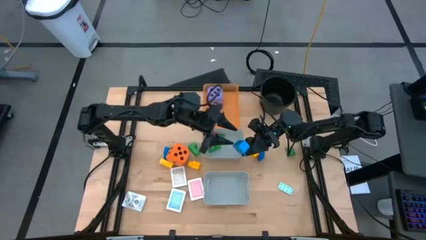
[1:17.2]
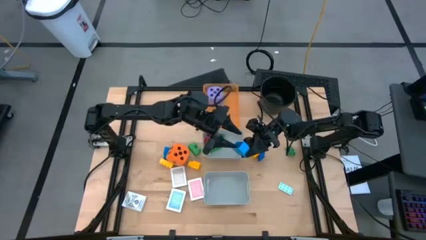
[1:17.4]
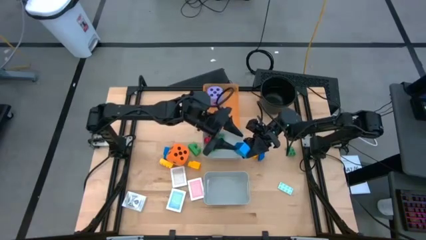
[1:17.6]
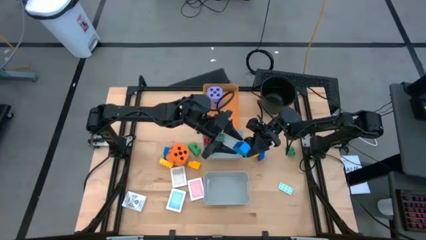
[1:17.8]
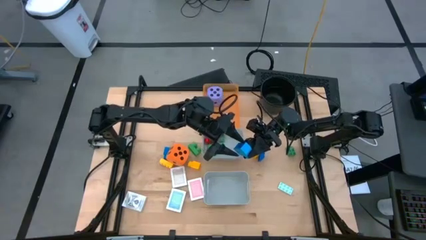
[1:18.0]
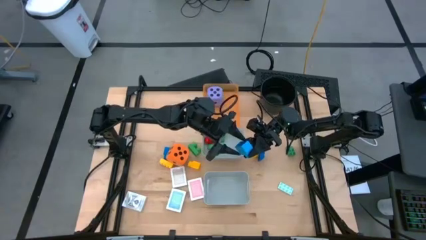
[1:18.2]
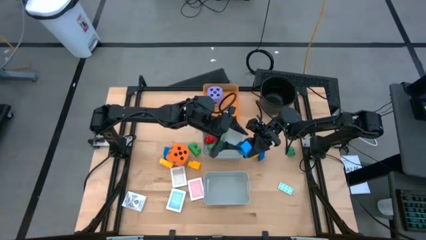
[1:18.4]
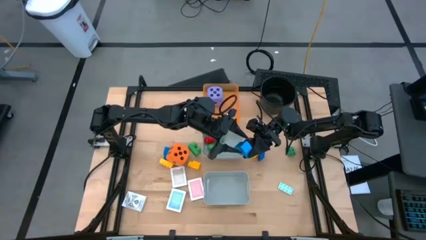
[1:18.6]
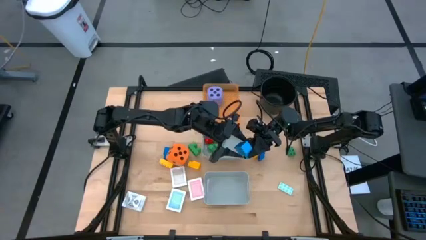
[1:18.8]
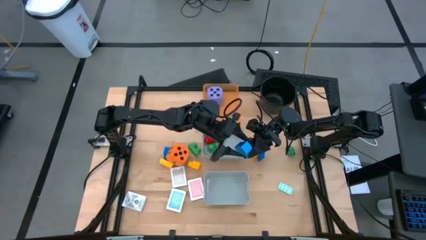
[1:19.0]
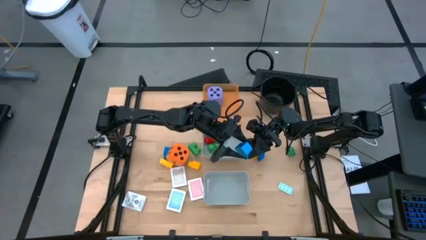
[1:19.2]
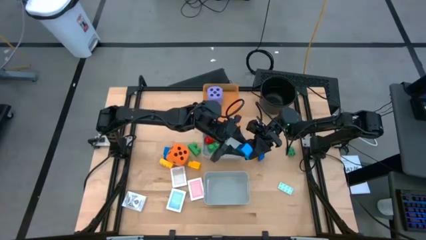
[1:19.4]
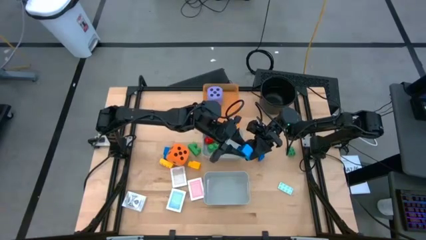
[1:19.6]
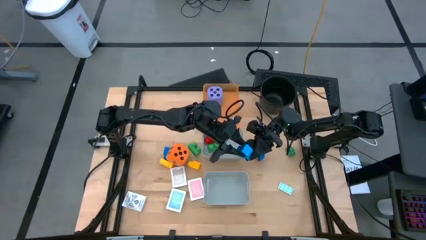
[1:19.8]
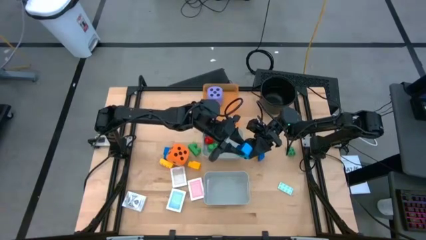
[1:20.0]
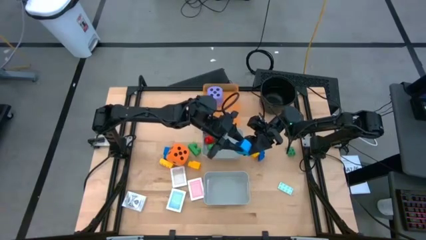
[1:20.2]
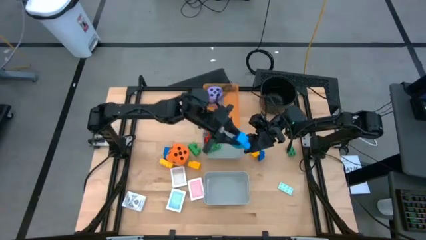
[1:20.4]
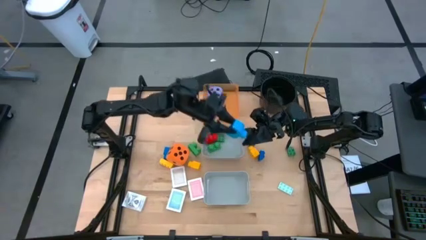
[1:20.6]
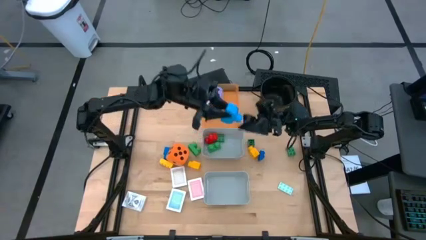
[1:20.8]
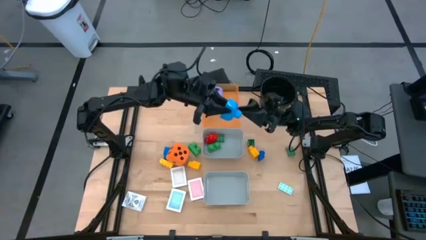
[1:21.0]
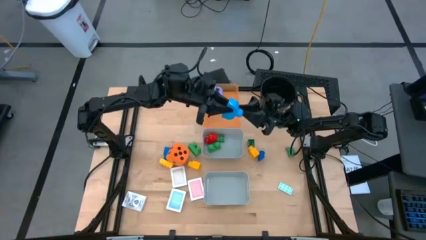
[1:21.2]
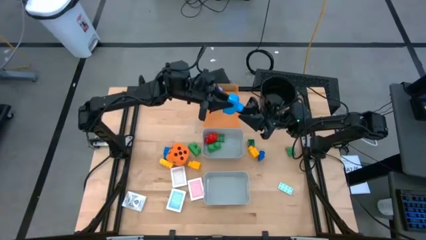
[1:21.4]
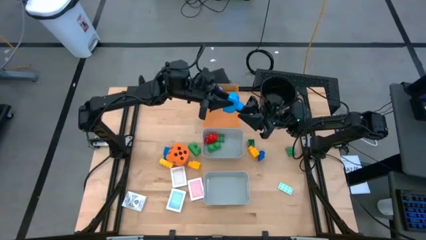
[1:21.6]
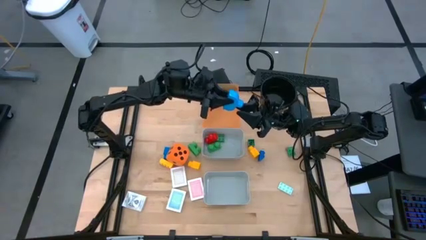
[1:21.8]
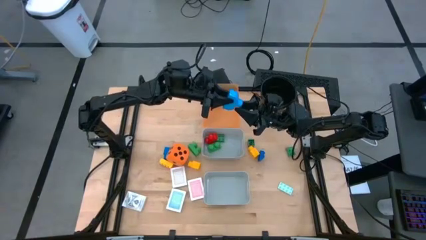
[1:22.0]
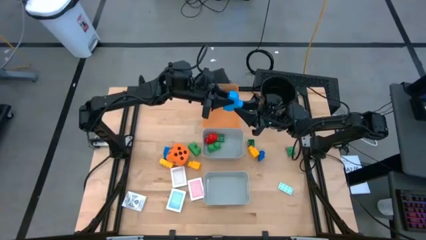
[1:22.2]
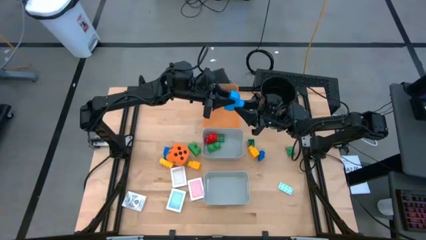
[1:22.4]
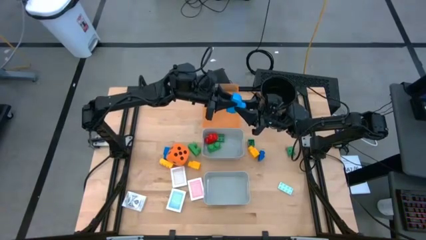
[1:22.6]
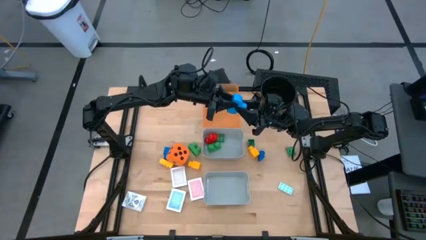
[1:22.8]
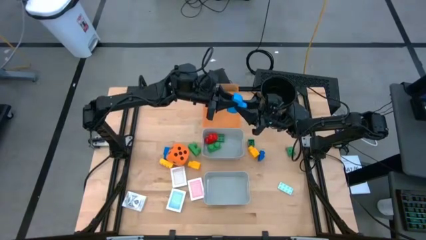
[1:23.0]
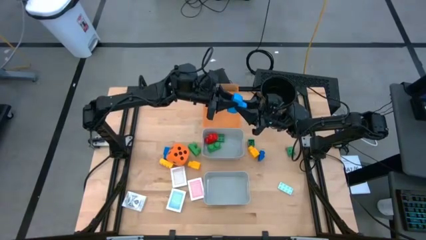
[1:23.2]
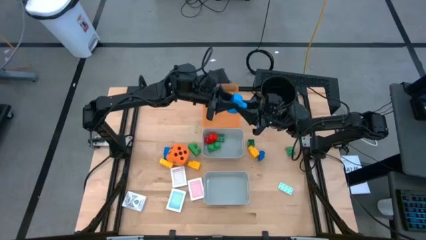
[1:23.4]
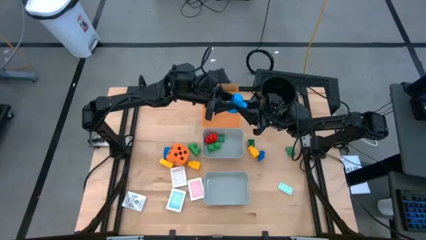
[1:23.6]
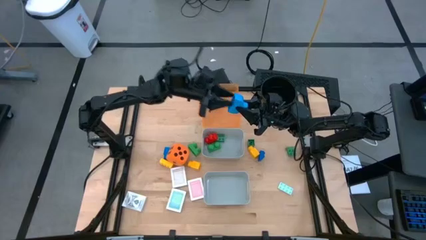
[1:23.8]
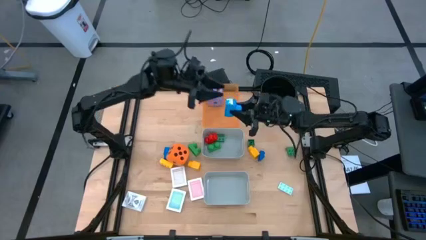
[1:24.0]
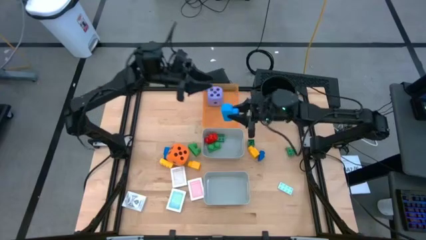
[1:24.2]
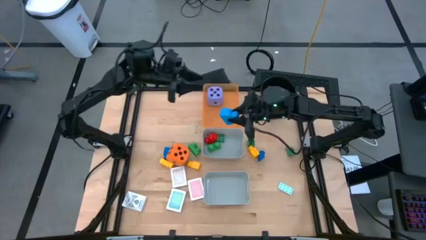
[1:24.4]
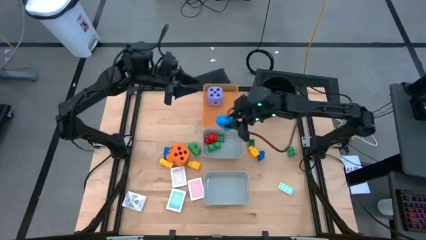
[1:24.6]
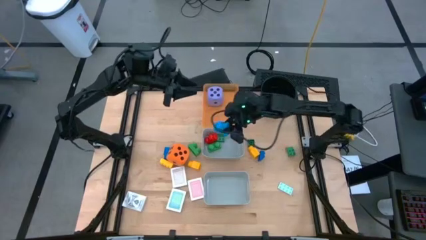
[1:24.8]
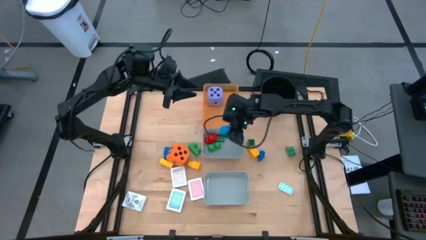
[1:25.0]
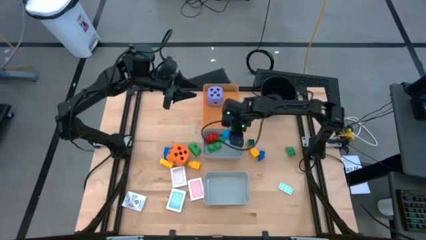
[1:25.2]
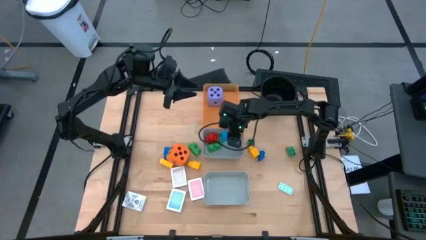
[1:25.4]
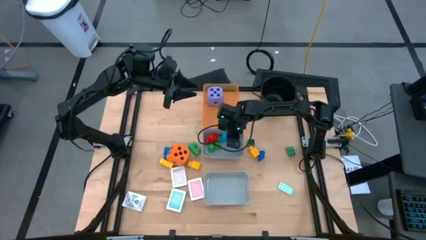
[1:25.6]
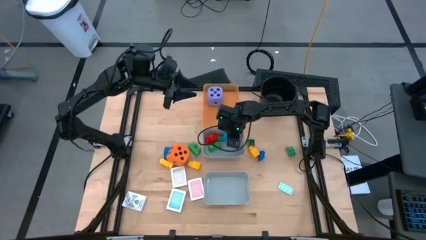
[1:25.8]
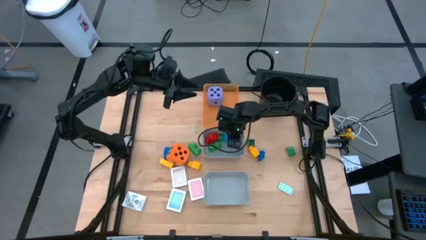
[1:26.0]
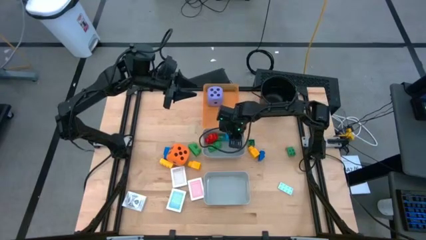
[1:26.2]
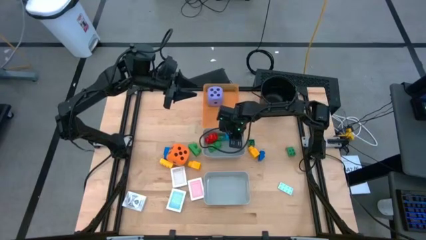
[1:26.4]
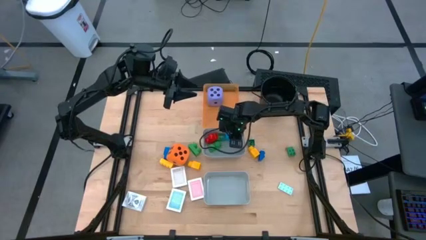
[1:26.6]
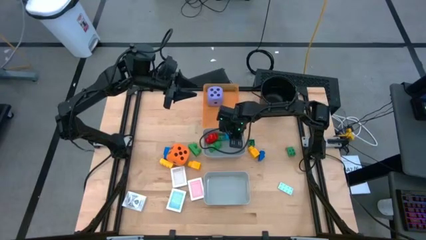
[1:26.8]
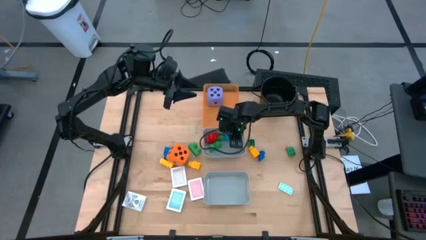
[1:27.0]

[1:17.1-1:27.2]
Task: Pick & Place Toys
Put the light blue game piece into the top gray bin

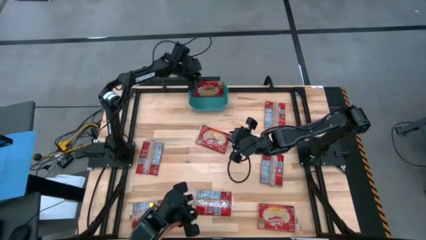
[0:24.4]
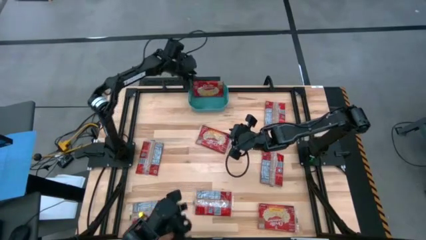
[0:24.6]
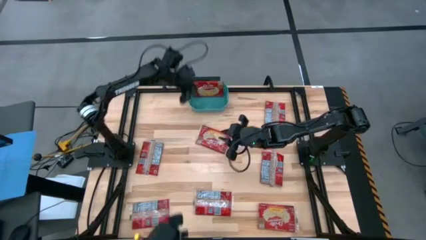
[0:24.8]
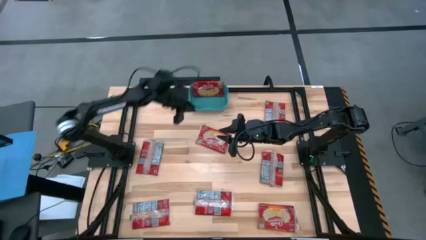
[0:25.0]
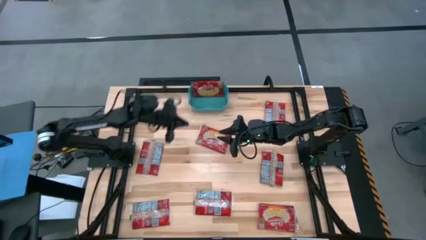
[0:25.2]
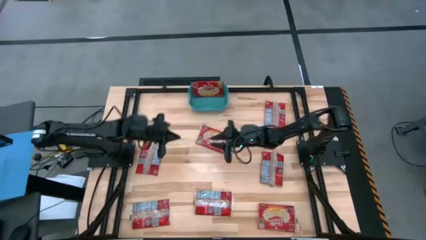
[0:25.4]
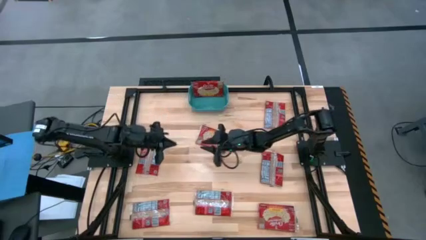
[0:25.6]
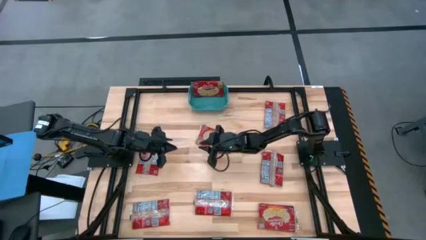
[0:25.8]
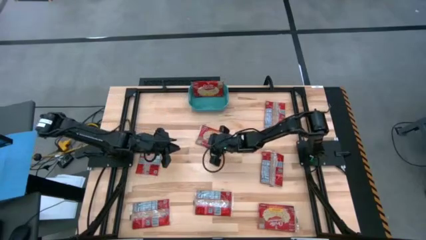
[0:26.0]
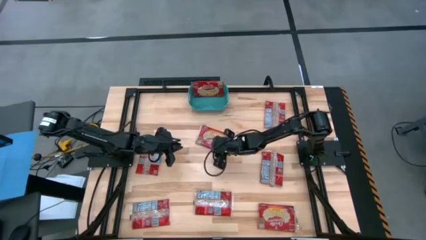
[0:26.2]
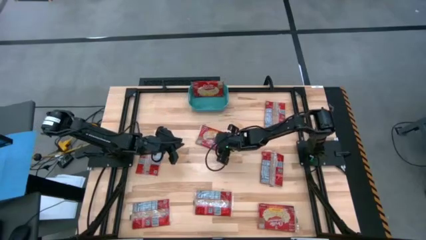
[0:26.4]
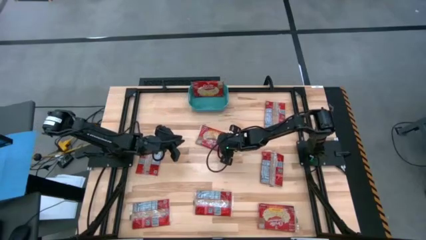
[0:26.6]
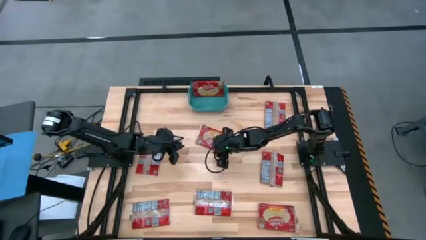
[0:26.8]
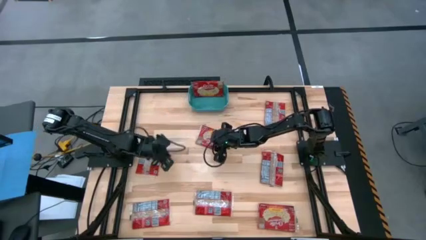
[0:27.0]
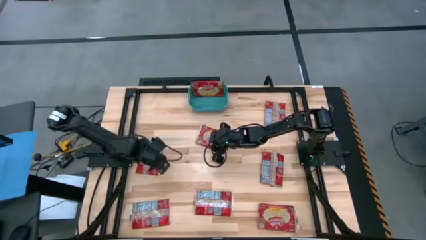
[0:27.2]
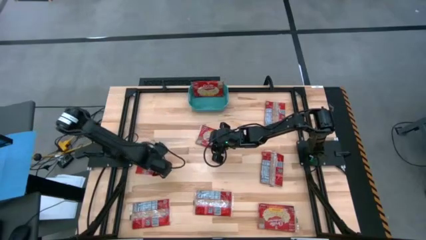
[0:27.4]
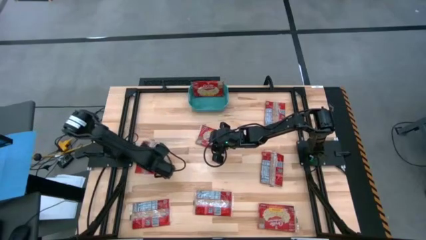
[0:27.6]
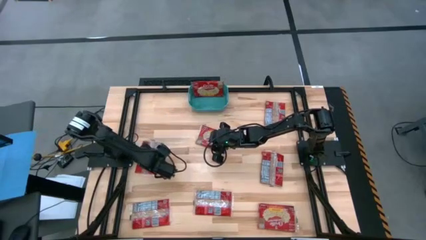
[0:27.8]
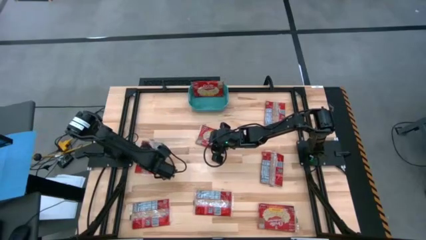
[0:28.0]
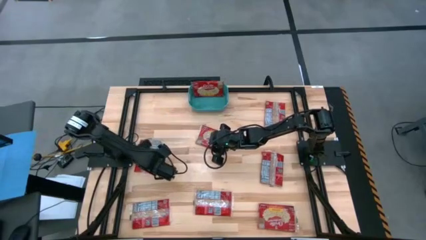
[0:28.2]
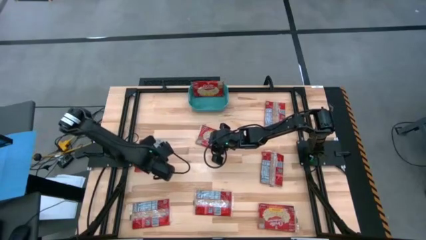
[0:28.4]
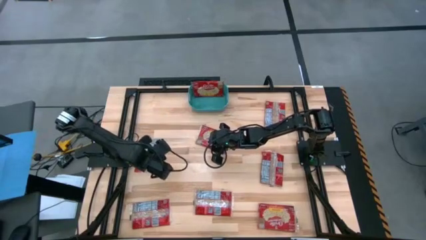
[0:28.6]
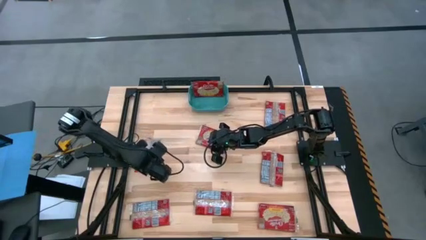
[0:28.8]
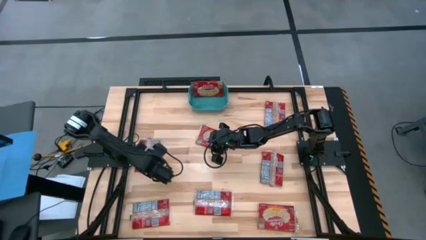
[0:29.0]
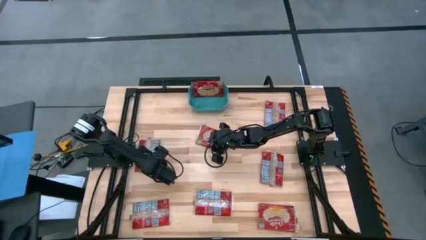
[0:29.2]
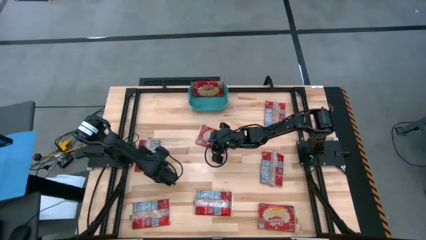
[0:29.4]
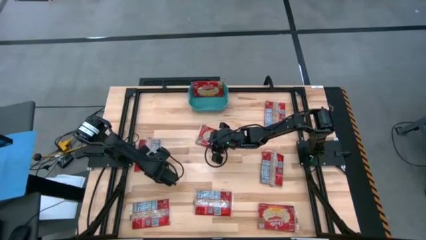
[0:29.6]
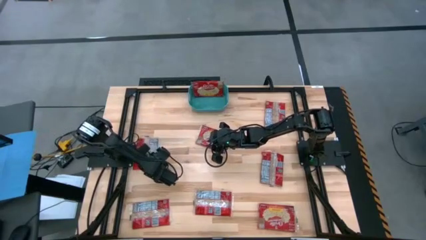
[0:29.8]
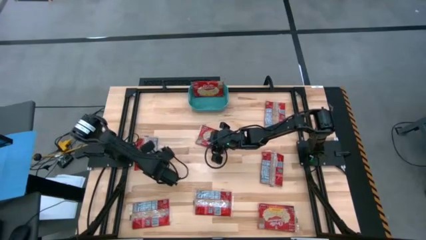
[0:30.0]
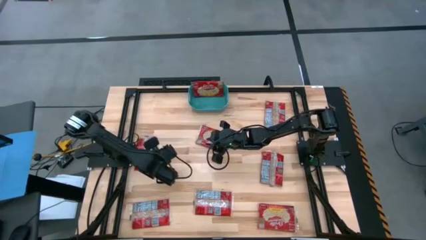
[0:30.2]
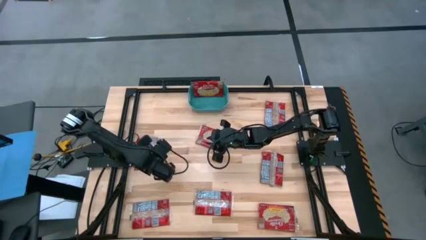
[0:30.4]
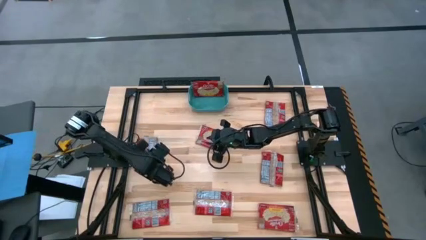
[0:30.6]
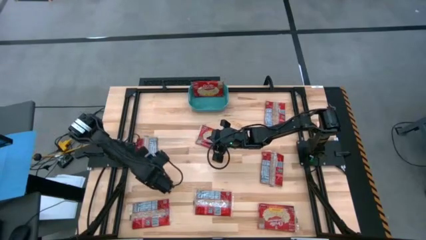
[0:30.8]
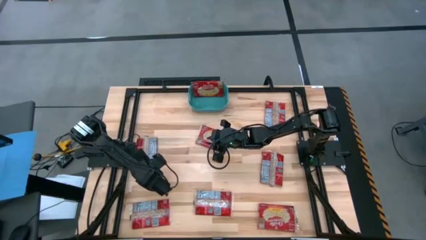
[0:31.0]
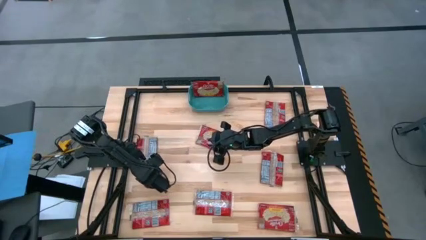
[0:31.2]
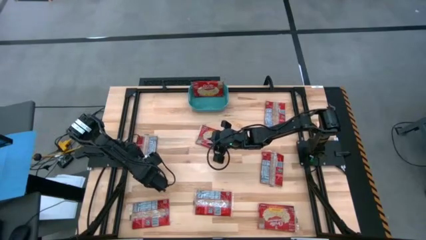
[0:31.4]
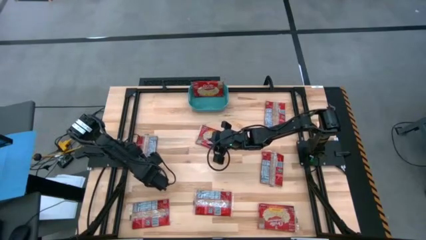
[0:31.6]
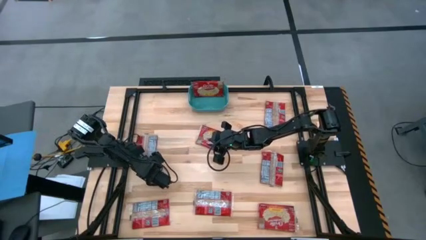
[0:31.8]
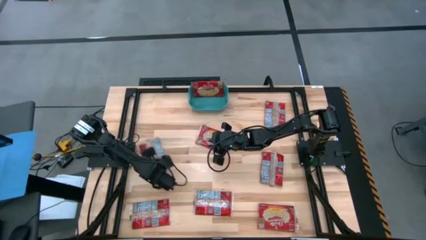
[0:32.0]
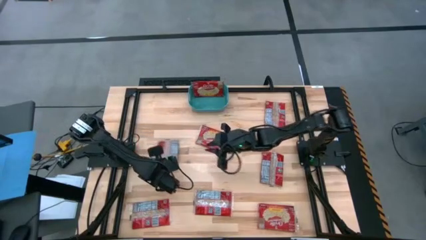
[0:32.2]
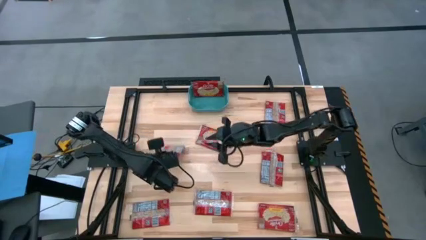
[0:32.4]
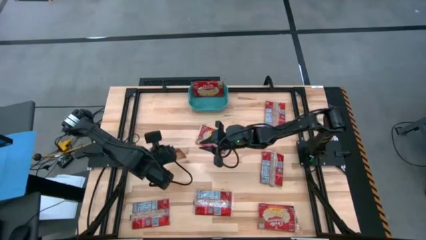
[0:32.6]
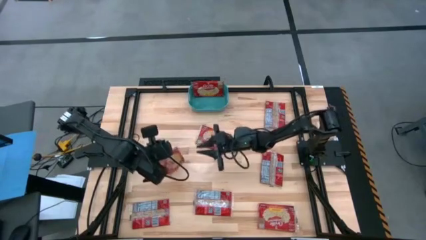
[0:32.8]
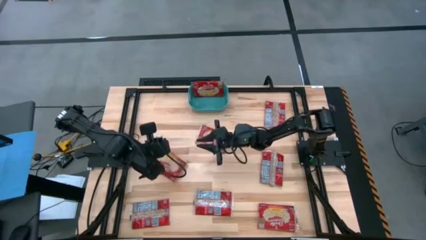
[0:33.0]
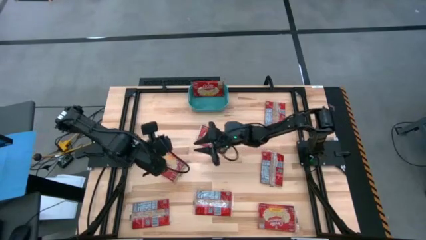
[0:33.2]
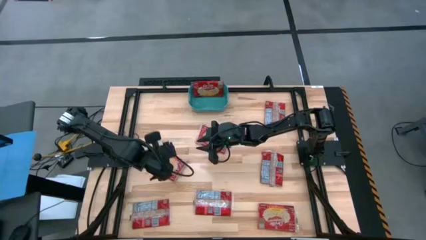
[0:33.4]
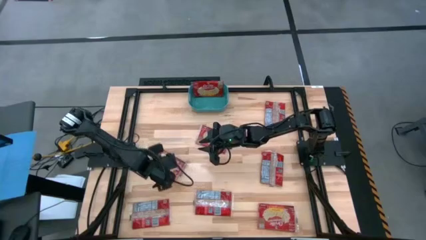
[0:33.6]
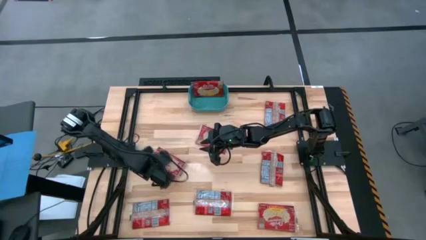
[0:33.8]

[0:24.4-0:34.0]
Task: Sort popcorn bags into baskets
Put the red popcorn bag into the green basket
